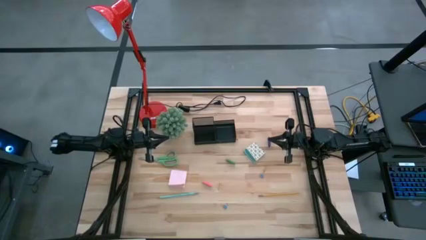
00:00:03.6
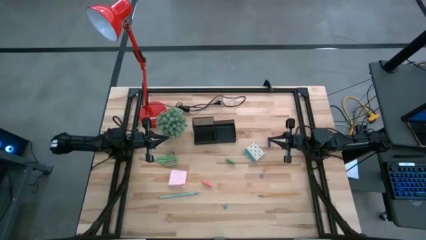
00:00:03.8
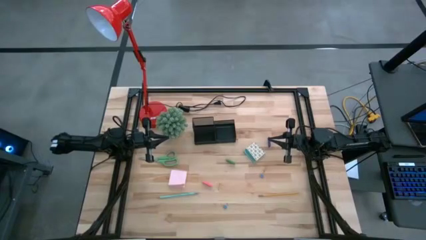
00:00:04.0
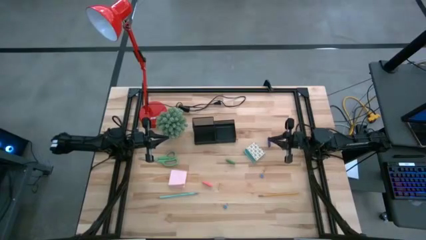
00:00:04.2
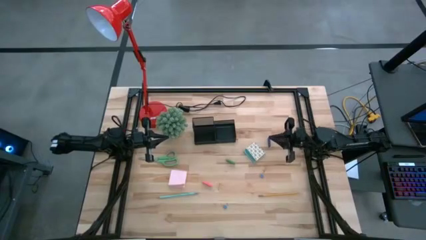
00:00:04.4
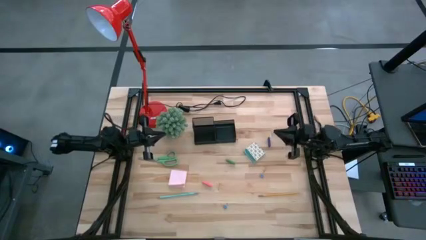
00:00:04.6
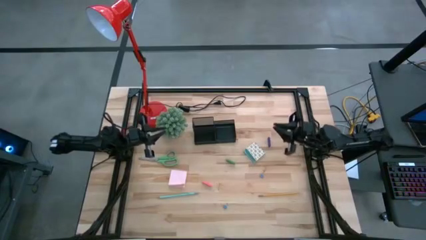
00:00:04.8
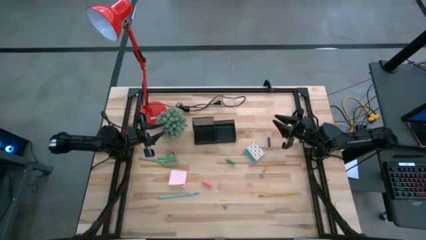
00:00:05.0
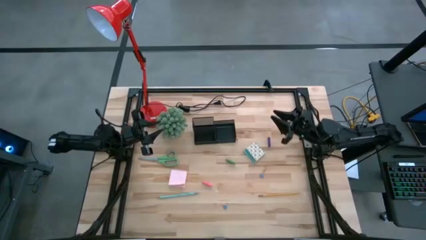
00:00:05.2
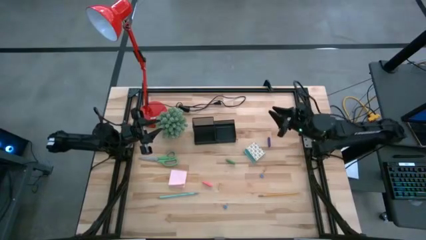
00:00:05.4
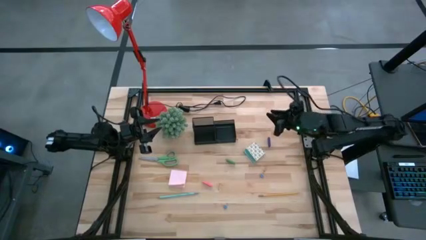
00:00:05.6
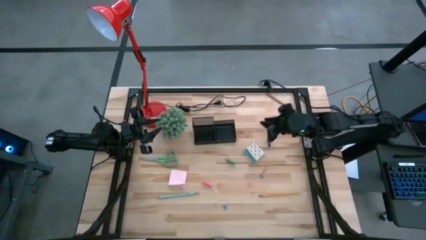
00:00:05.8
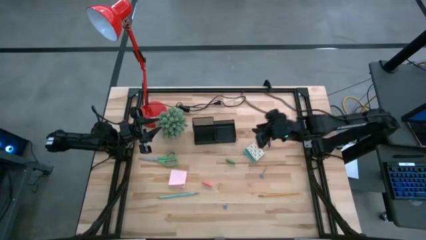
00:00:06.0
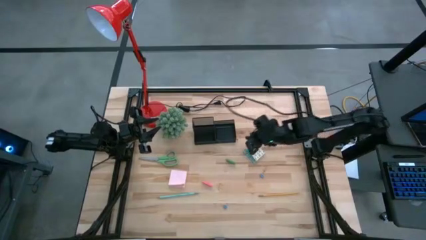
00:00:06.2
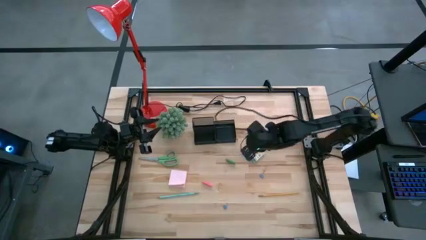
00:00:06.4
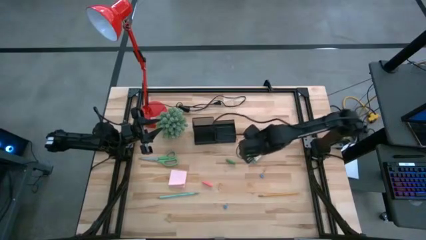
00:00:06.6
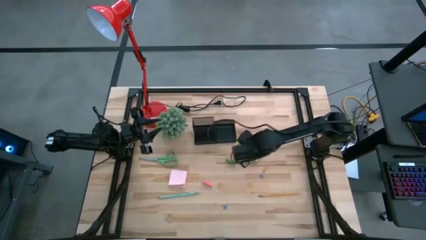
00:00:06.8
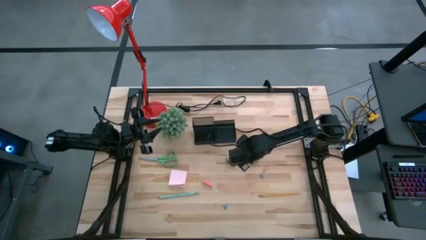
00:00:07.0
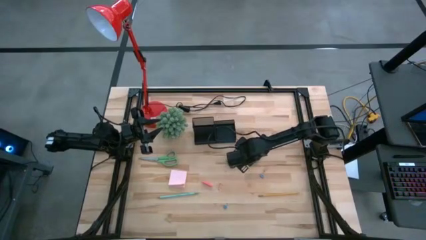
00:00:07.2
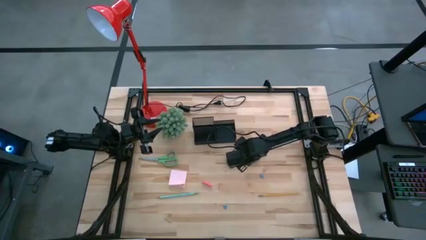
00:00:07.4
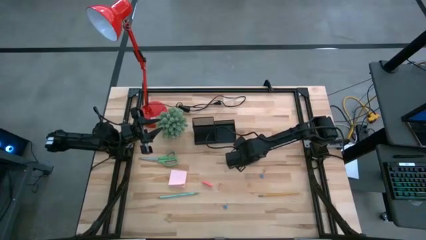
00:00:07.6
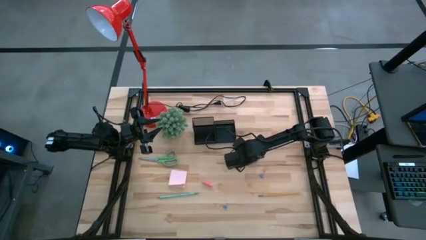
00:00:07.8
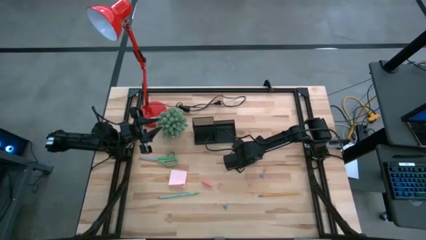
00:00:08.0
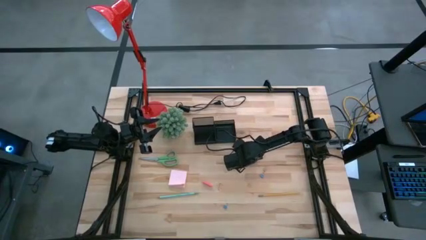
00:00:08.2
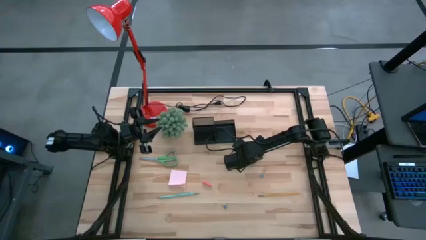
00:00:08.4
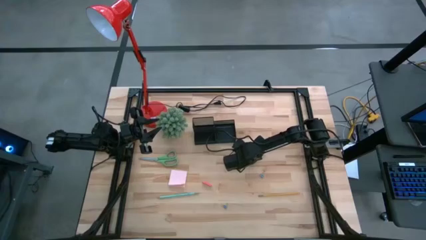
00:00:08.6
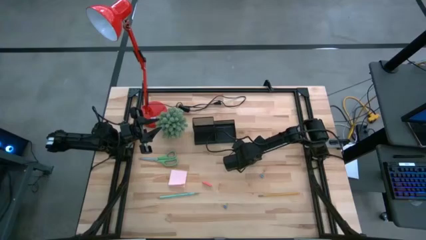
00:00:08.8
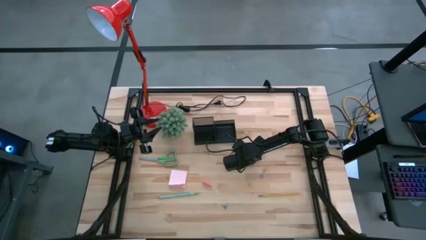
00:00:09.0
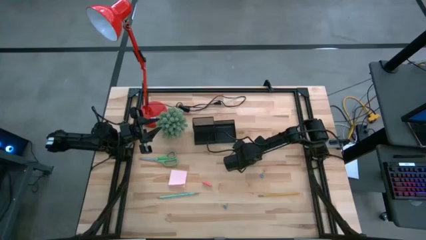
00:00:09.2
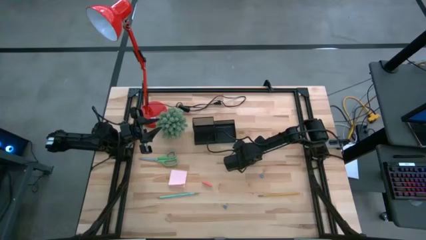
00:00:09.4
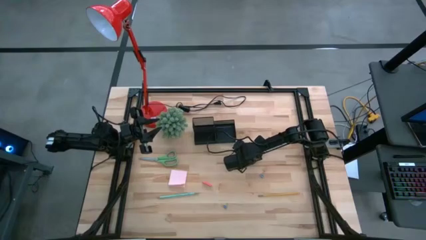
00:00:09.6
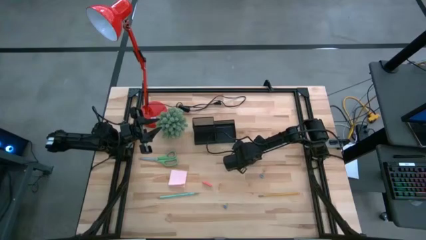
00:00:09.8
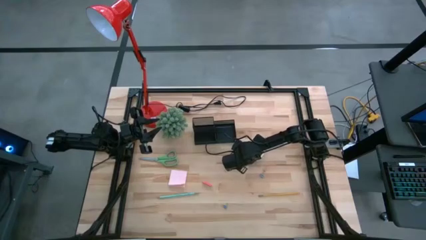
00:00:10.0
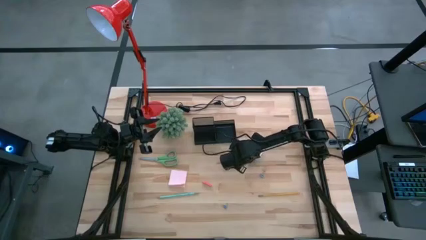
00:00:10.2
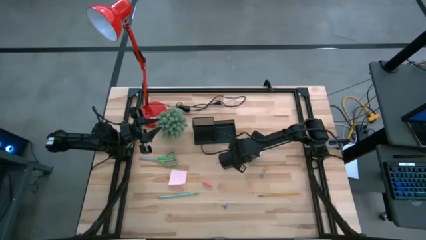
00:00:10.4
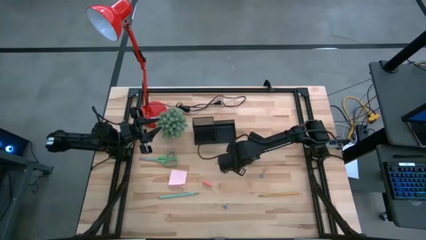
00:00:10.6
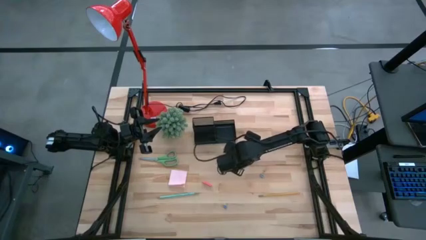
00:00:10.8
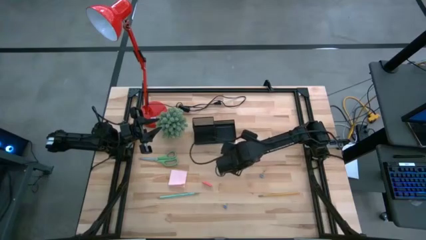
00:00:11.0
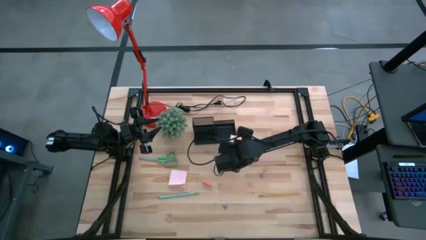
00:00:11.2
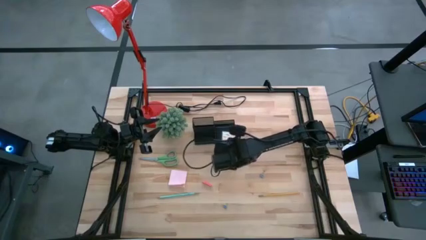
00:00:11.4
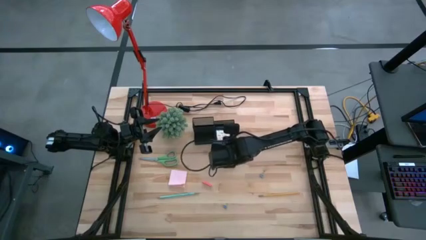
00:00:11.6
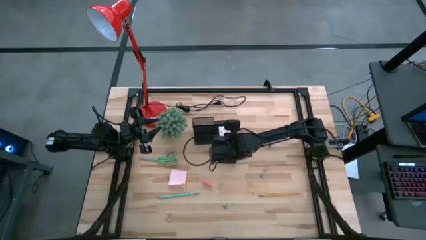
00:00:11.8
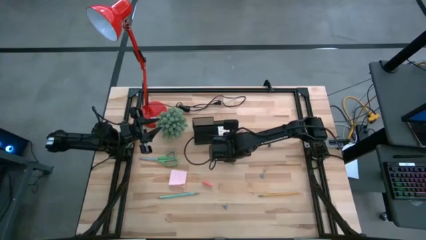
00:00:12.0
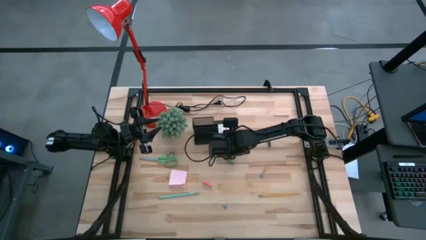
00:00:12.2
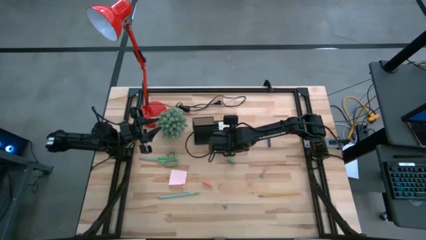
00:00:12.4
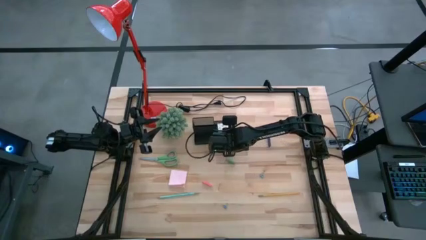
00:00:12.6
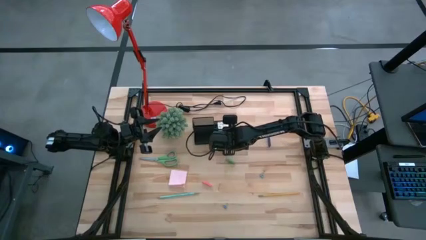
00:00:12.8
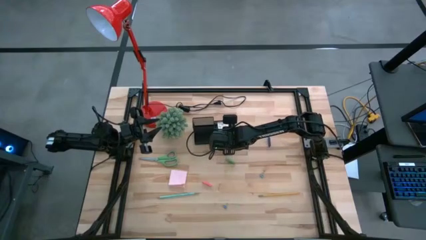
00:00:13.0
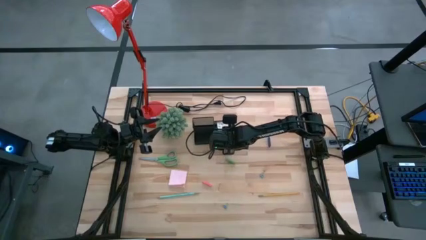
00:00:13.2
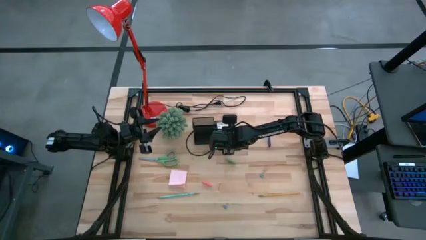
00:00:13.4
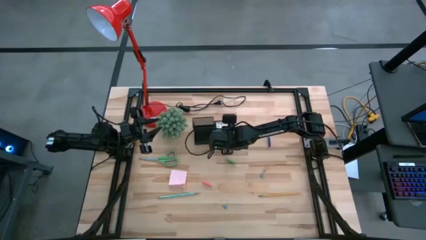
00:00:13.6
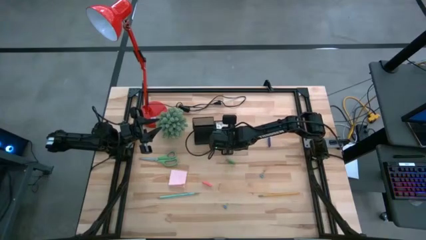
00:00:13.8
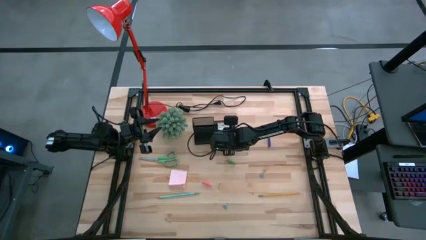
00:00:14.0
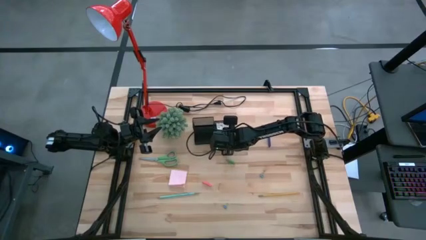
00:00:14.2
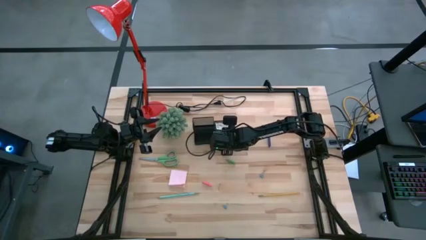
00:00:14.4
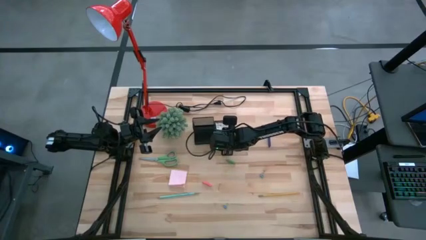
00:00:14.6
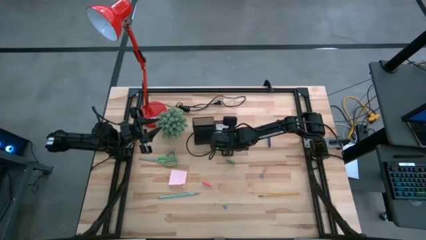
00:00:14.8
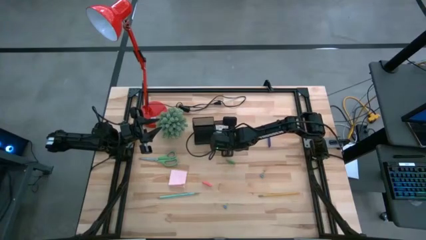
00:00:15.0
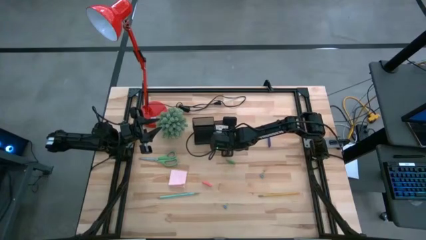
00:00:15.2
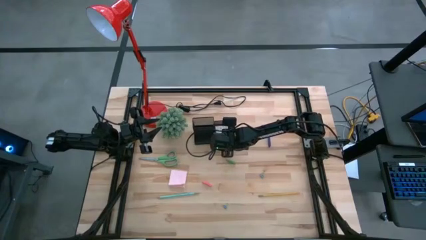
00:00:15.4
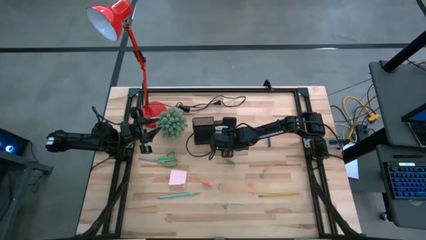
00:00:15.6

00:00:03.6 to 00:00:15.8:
Task: Pick and place office supplies into organizer
Put the blue sticky notes into the desk organizer

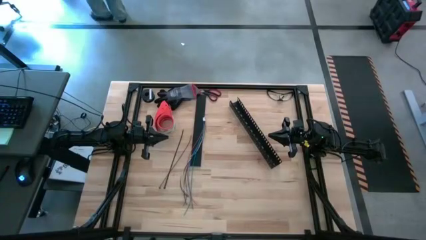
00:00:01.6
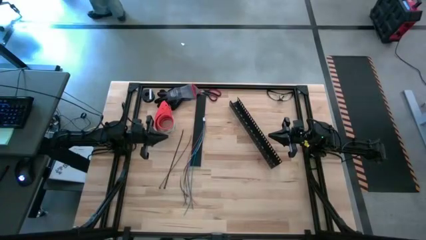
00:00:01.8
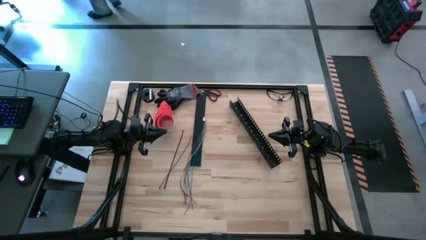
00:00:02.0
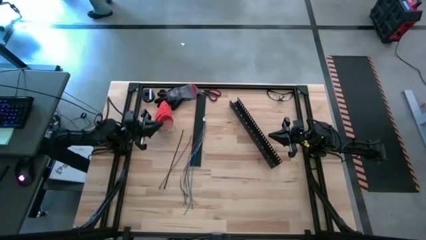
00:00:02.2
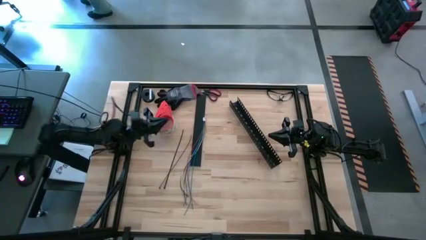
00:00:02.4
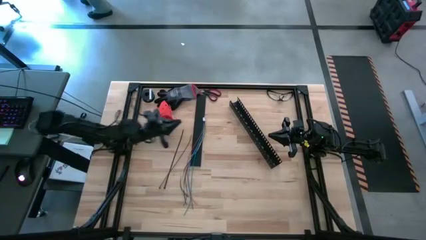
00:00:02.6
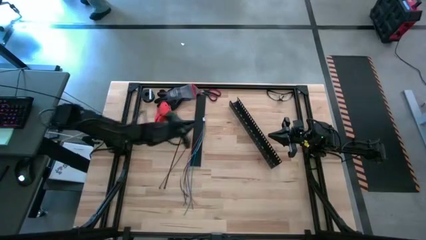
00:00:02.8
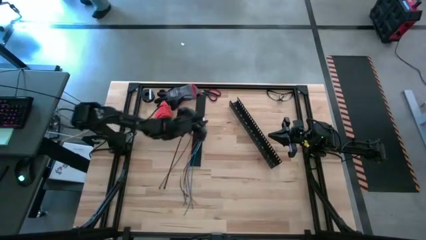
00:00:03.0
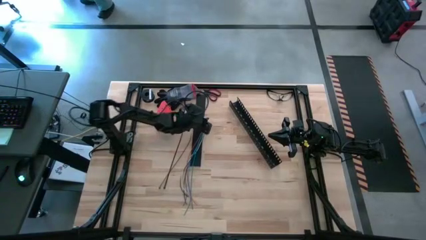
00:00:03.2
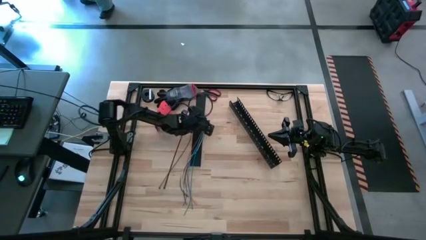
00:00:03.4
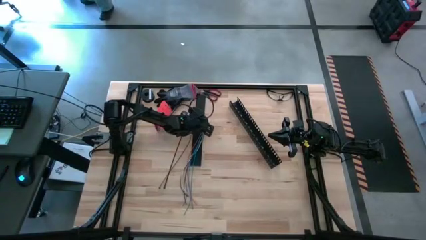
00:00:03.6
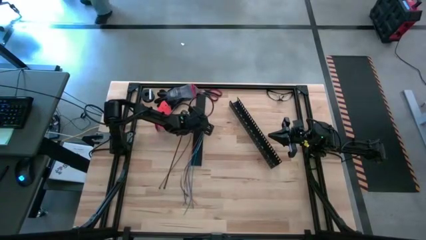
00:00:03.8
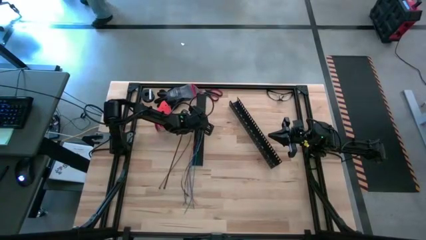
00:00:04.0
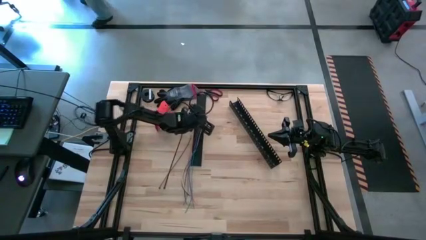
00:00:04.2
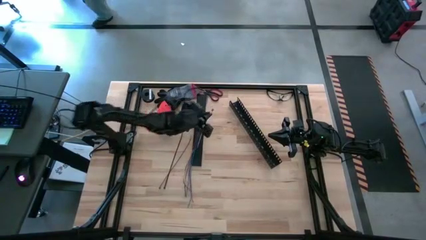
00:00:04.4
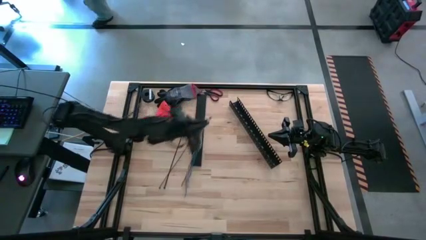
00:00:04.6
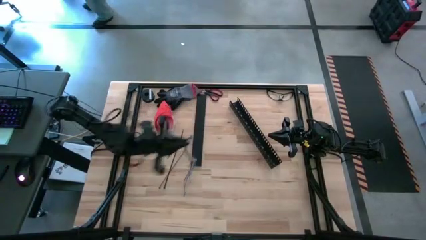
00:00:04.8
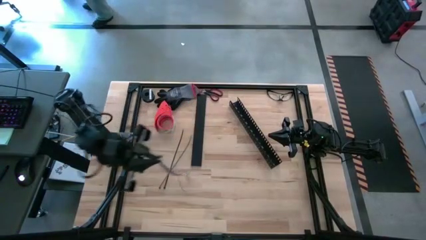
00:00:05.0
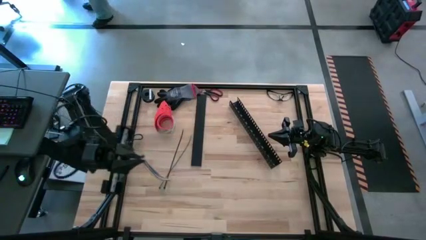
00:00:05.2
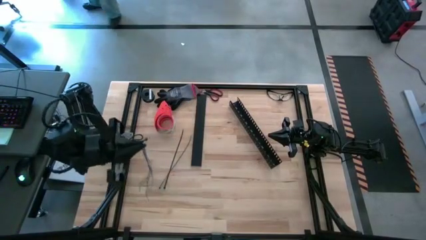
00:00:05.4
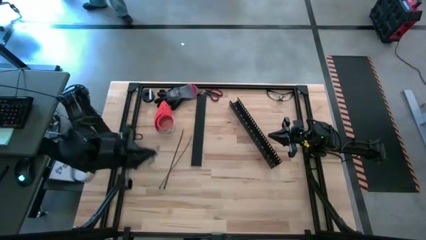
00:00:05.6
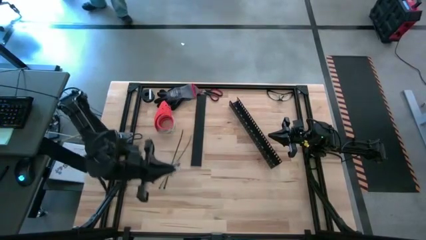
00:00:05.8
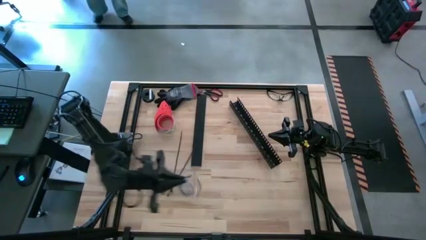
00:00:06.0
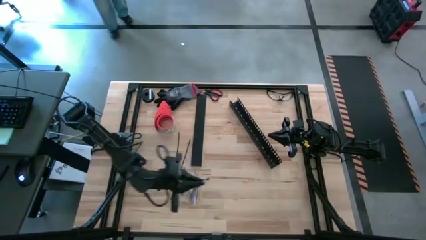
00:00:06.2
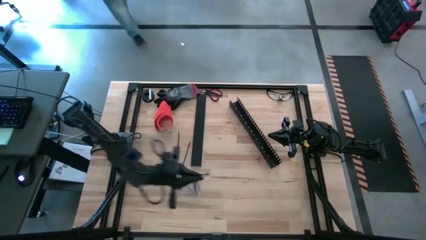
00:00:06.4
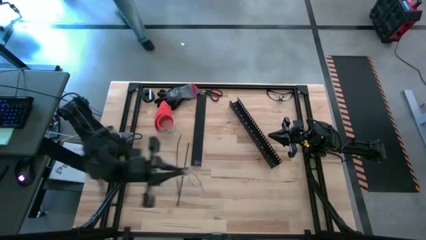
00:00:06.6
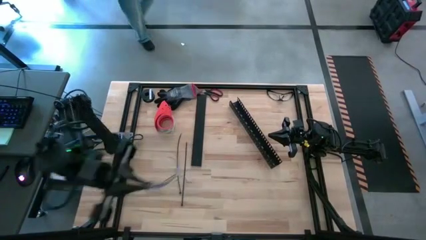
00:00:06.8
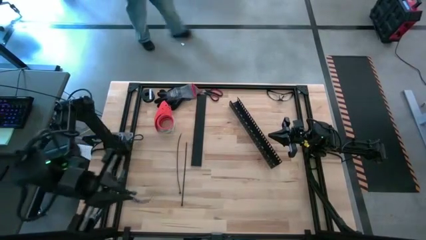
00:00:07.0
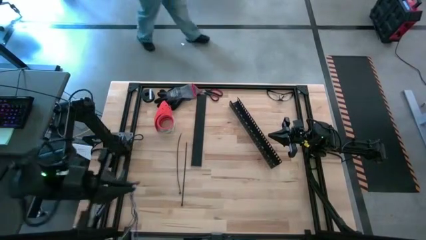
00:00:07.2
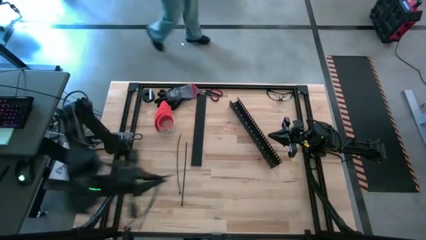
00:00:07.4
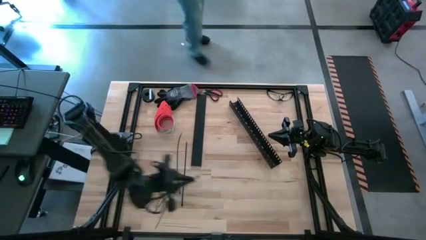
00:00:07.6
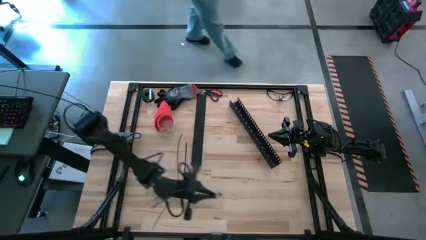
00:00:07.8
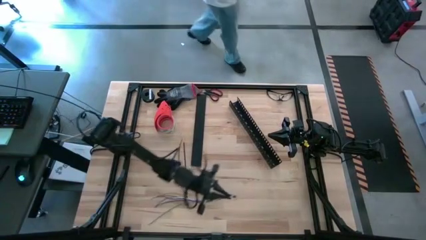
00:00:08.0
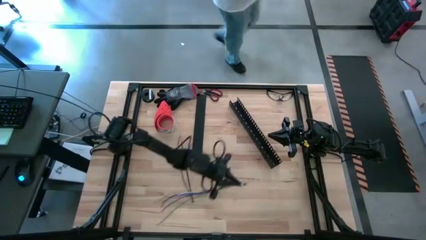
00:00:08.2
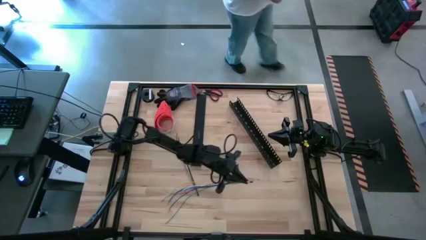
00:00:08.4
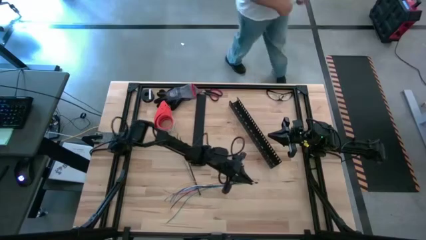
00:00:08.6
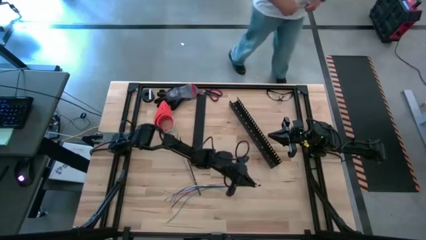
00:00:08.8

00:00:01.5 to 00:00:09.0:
Task: Ziptie cables
Move the cables to the center
